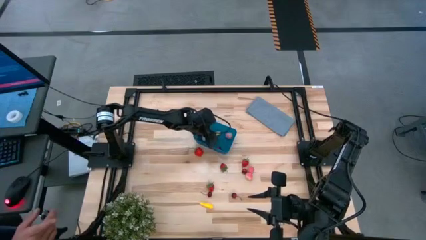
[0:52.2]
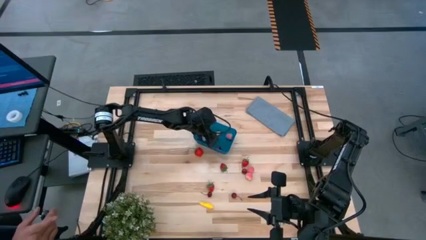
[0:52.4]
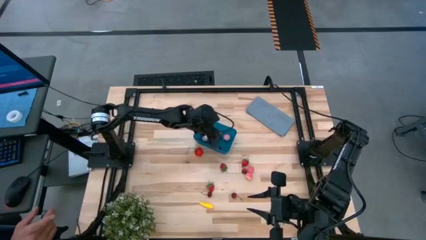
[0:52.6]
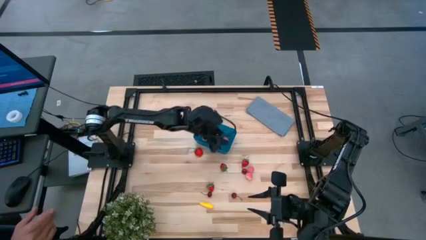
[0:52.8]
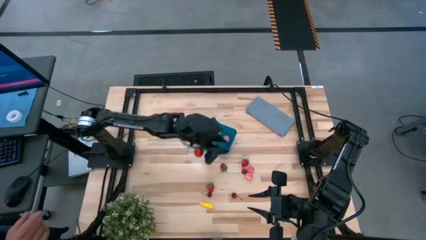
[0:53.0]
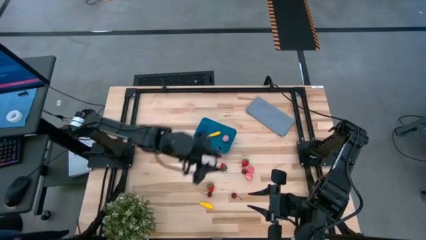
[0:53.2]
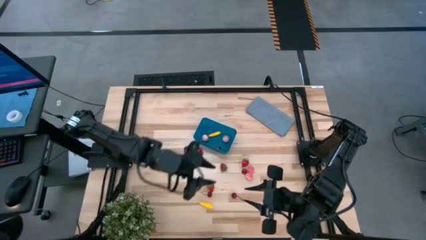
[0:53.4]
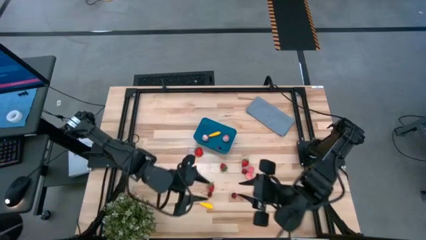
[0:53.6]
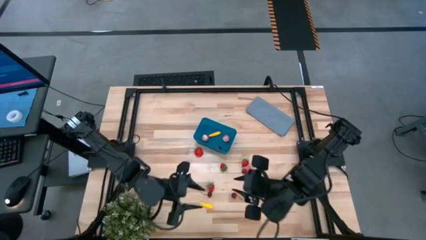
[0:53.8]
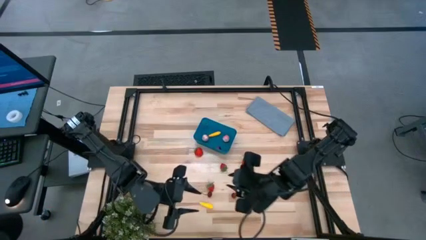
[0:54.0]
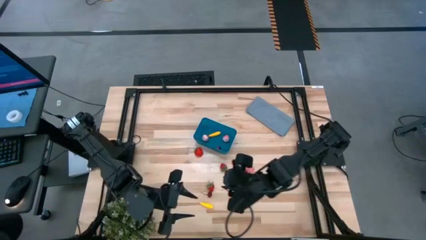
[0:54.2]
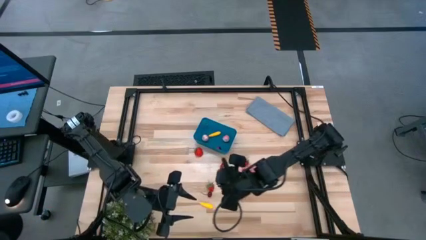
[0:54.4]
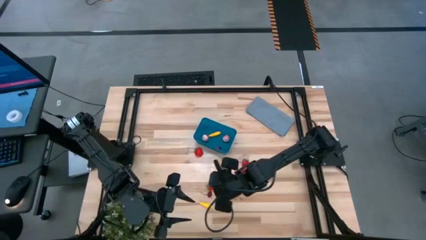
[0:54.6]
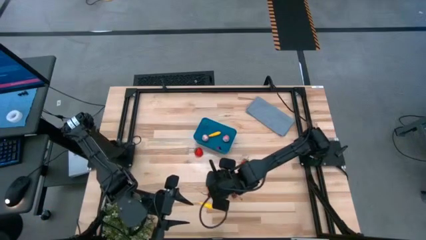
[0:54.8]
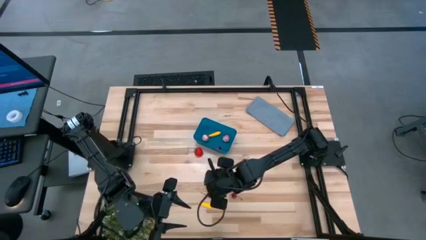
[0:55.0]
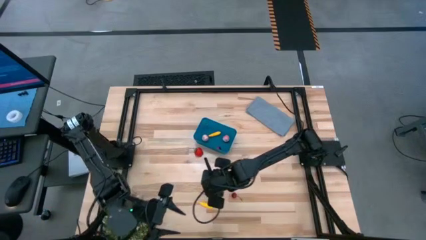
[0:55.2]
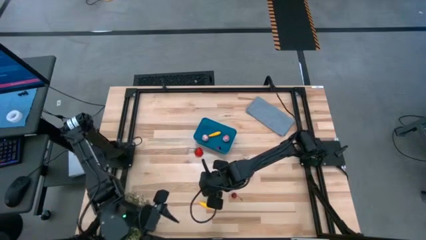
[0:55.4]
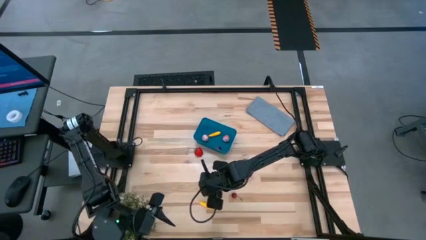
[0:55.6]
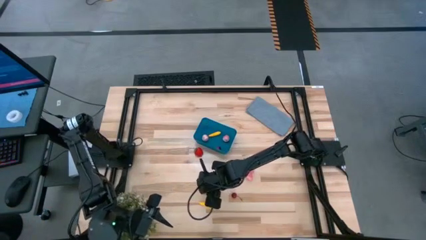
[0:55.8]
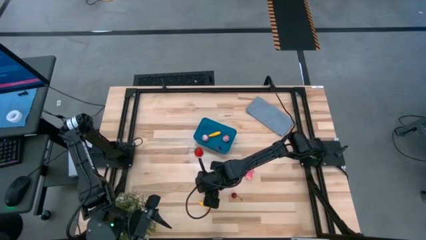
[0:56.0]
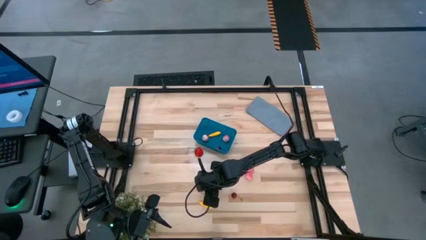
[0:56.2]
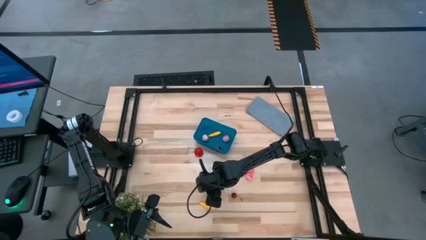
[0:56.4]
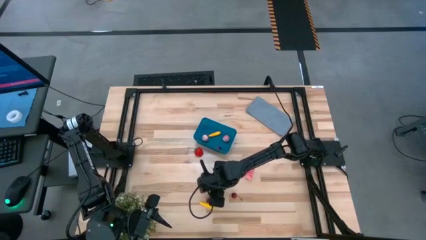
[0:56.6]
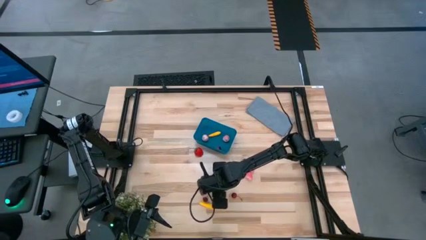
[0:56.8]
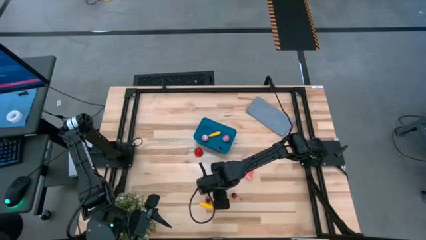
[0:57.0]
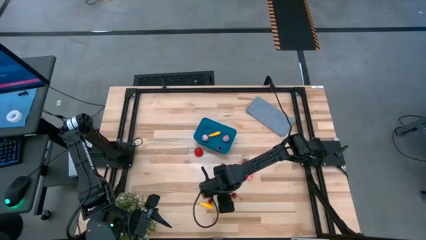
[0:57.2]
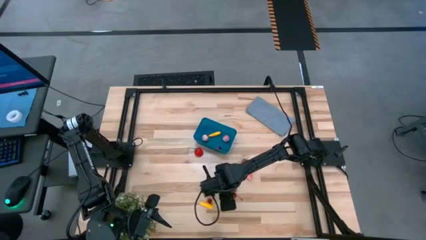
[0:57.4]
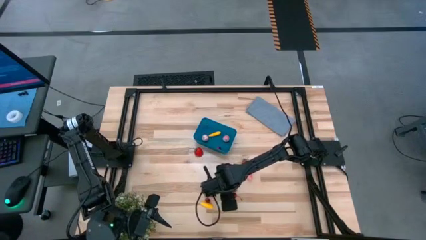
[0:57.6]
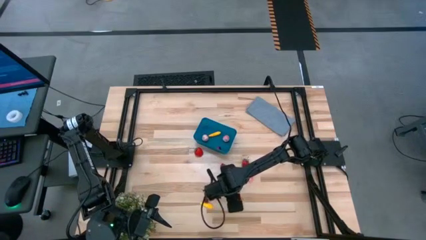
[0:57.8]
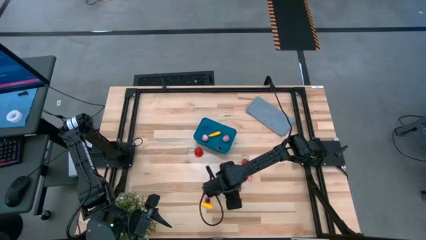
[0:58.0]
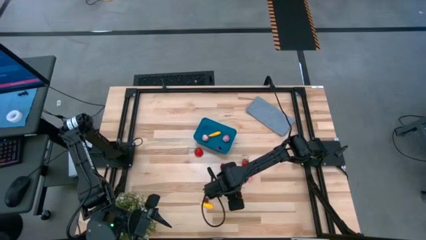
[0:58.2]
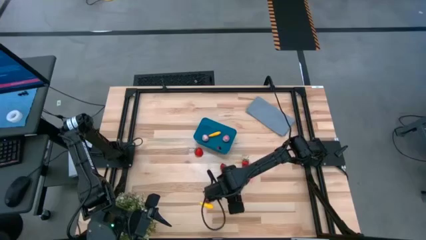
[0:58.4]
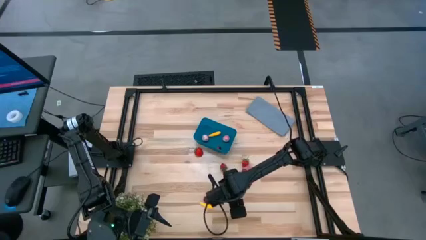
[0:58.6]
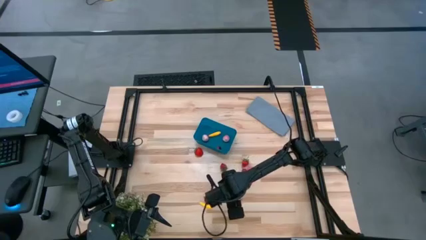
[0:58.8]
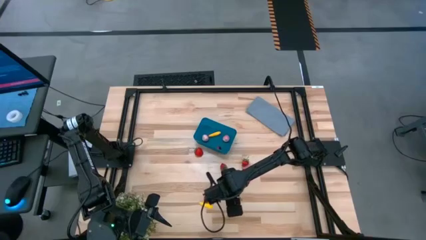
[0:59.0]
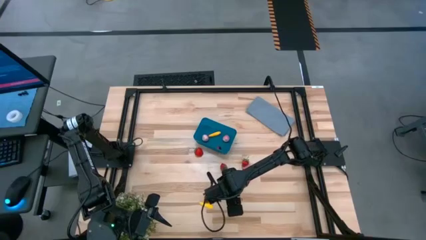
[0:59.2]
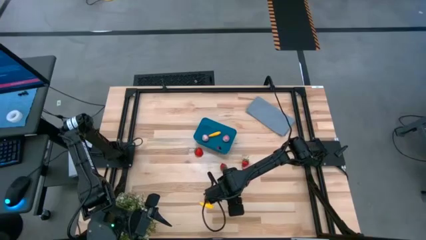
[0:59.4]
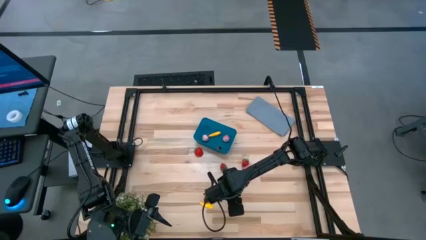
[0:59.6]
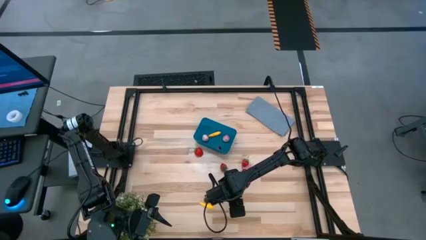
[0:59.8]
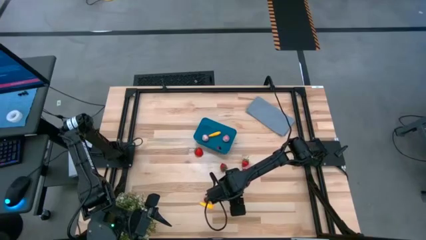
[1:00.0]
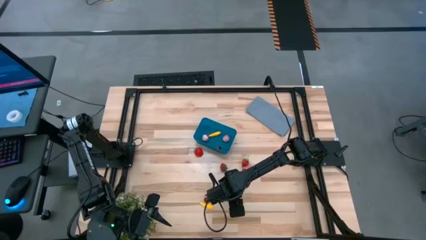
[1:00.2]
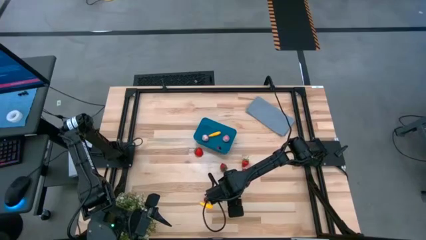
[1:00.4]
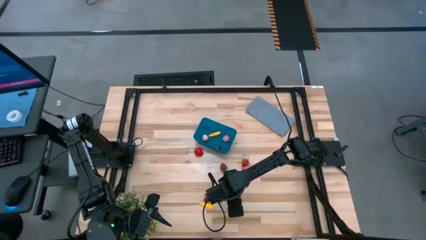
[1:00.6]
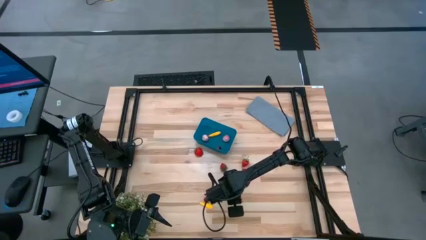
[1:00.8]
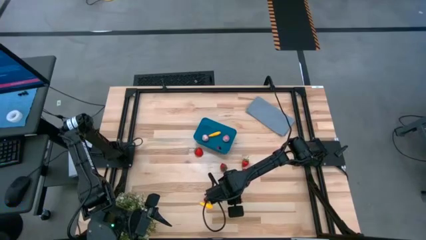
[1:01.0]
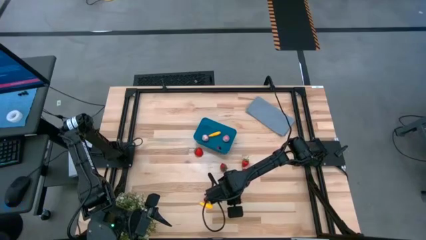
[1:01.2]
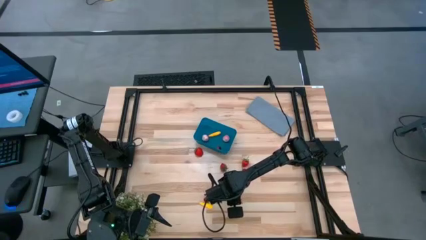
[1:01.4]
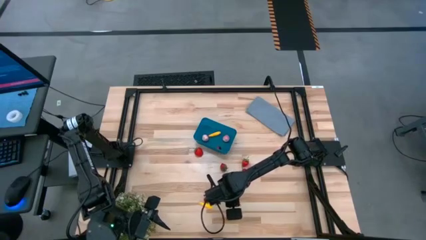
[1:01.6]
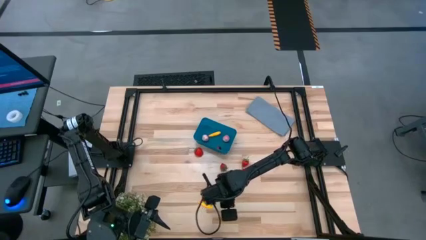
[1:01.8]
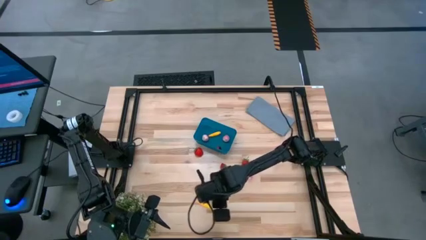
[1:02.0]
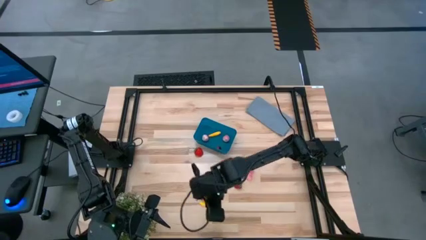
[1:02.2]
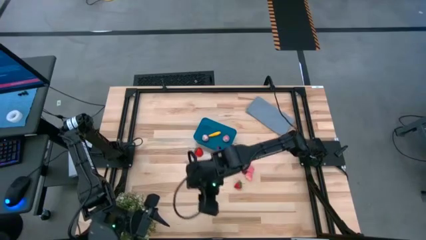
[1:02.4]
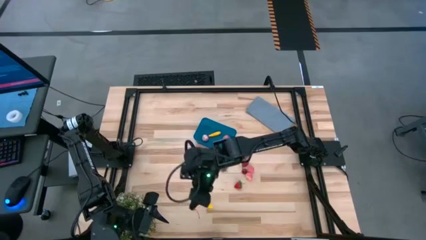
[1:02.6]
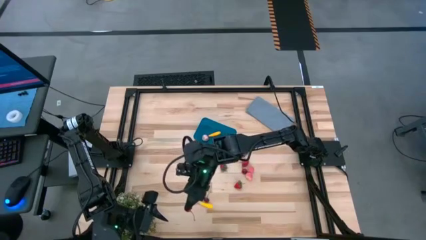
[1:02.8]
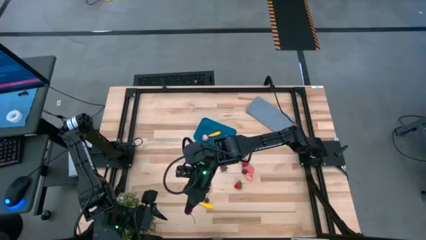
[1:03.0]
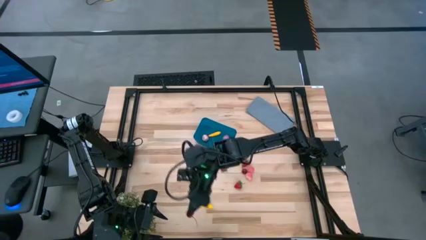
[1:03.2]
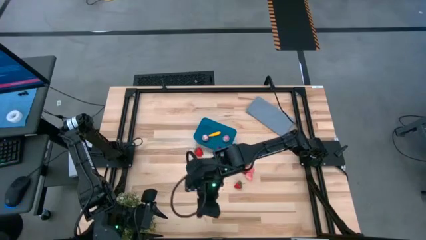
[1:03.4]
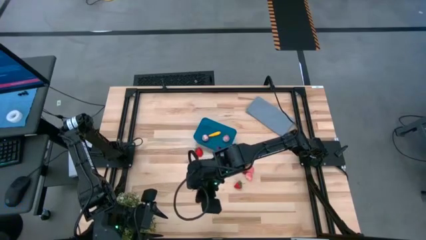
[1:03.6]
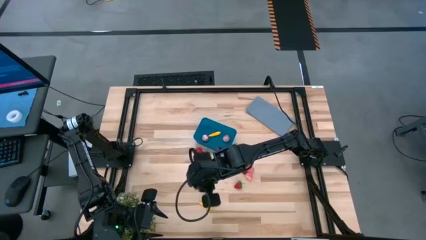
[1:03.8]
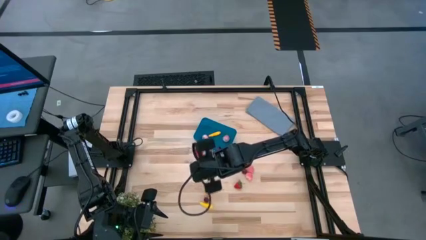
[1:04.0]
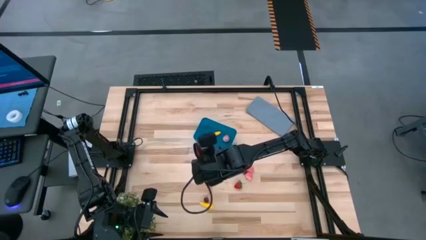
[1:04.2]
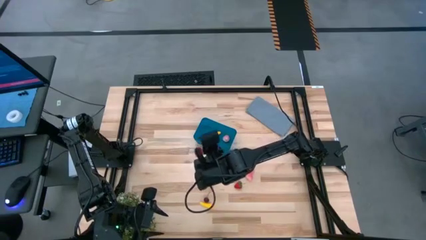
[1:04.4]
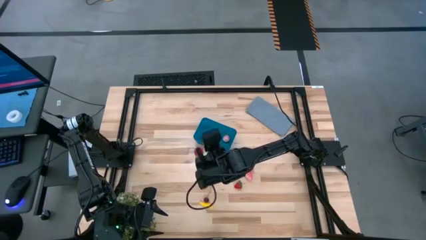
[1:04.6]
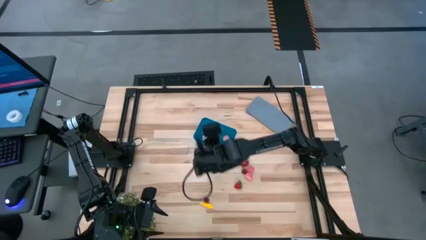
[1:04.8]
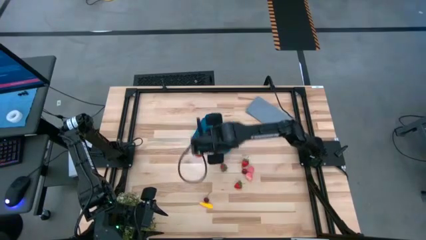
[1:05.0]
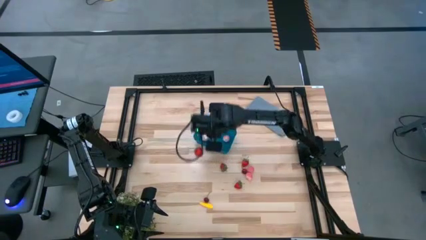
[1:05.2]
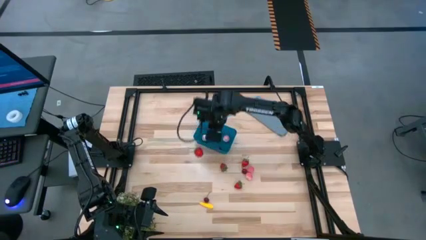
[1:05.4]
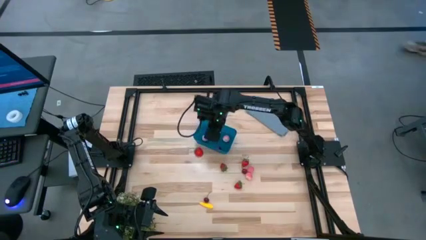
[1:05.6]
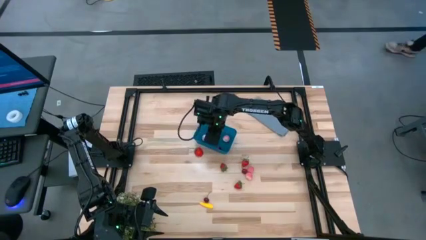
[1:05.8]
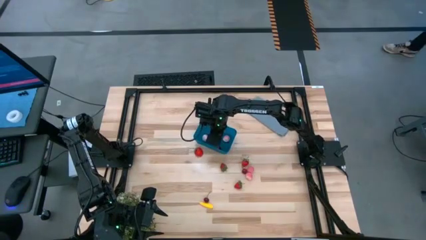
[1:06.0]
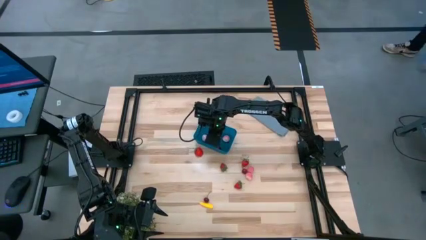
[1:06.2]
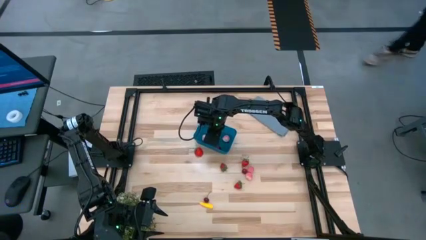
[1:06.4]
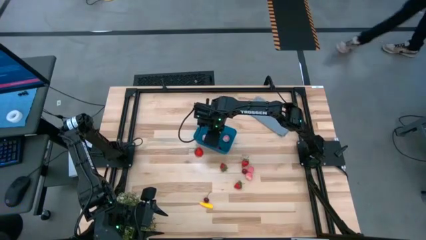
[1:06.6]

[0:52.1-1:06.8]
Task: Pick and placing Produce into tupperware
Put the red cherry into the blue bin
